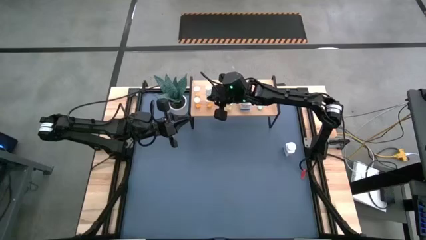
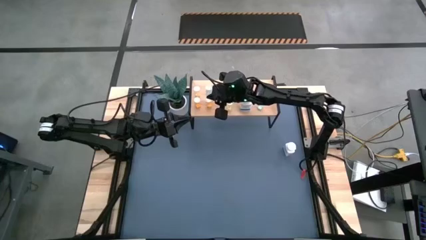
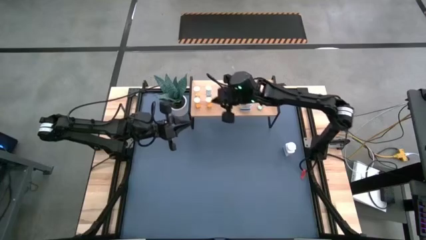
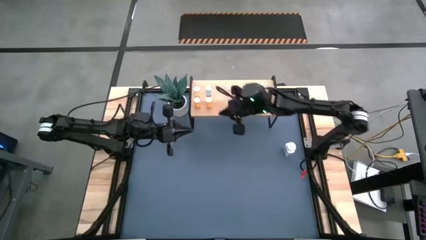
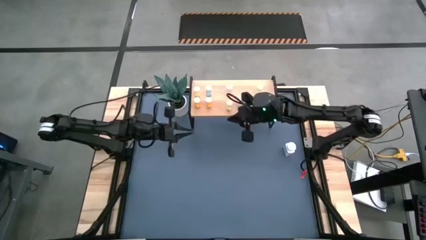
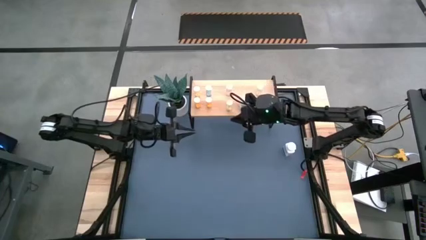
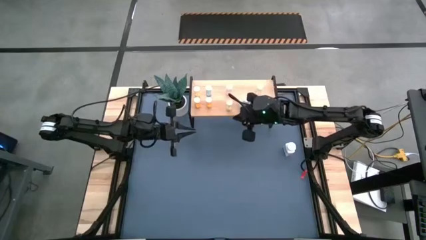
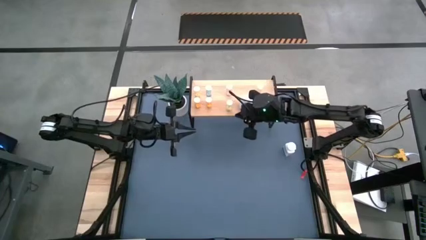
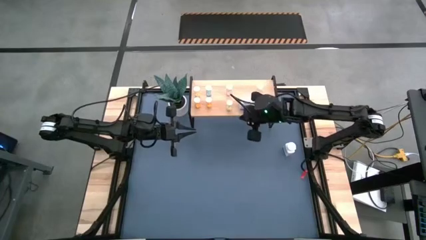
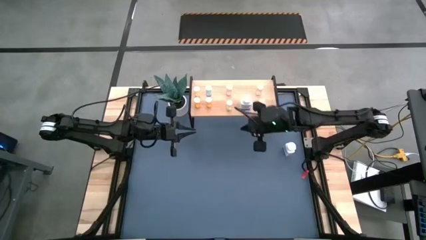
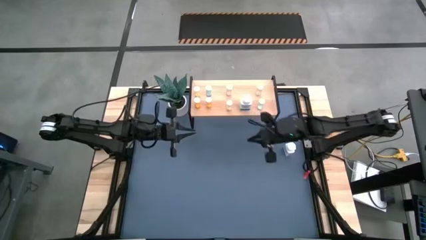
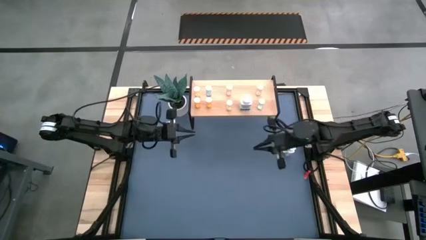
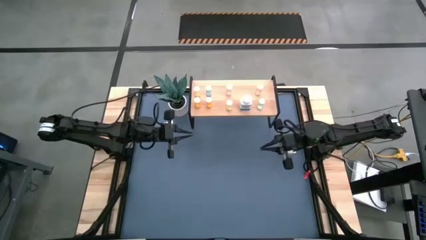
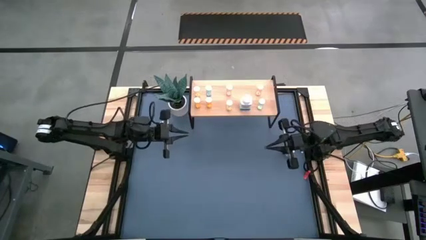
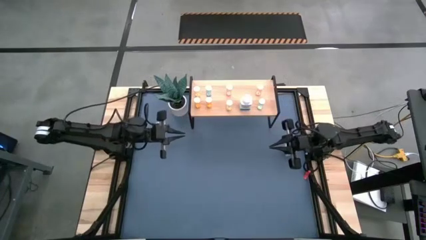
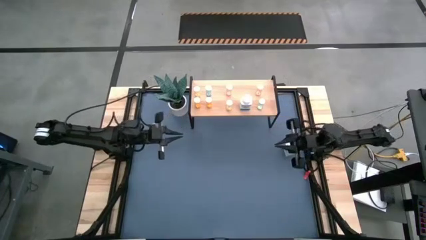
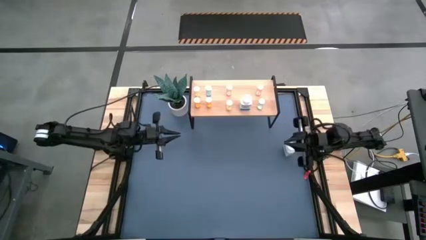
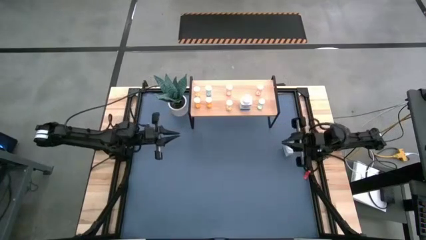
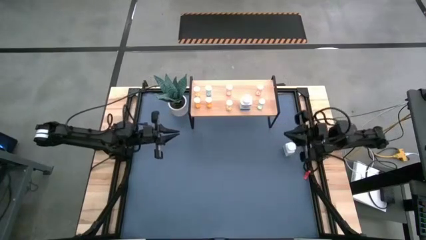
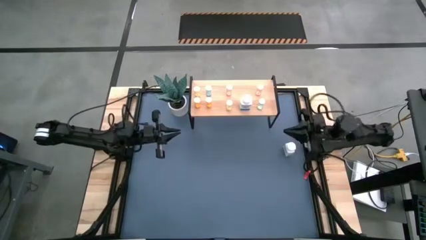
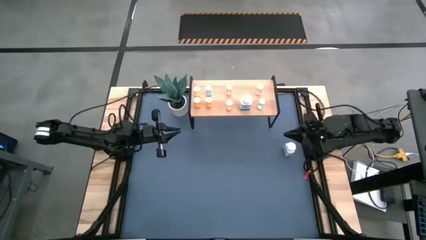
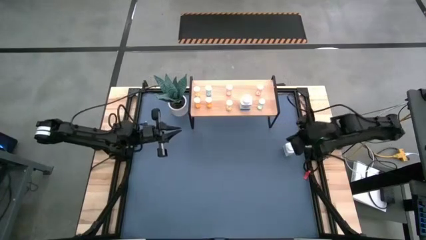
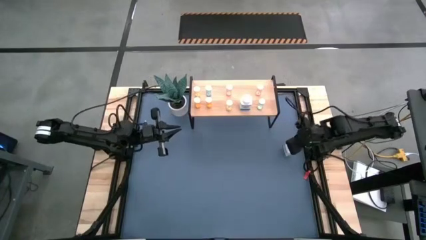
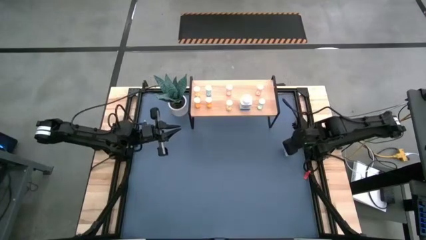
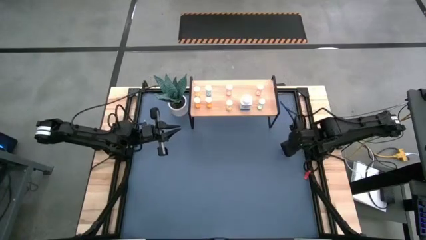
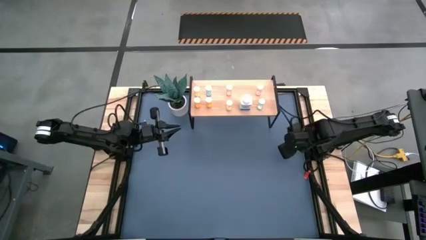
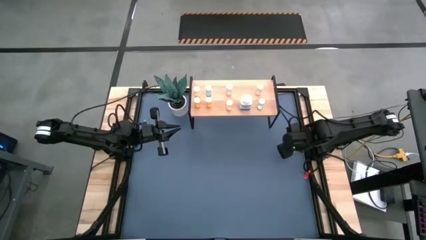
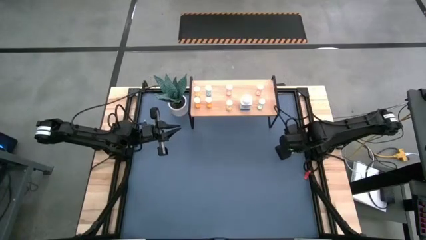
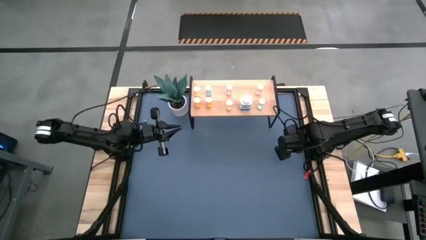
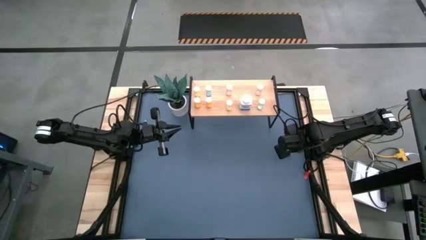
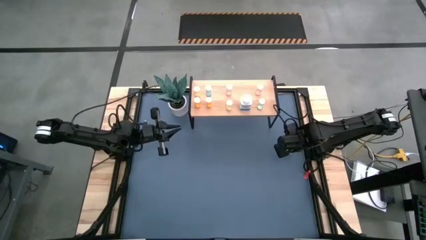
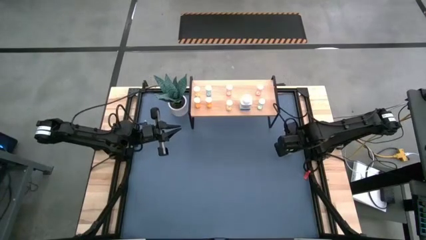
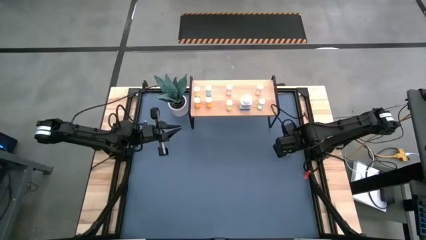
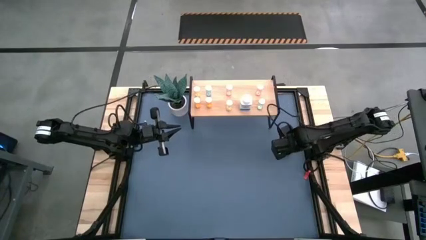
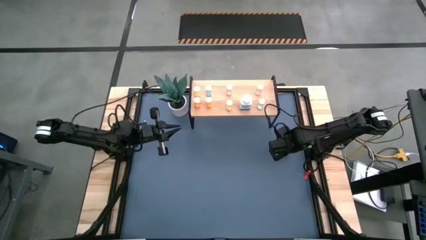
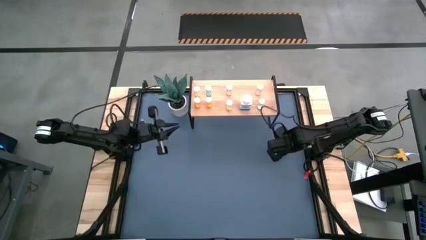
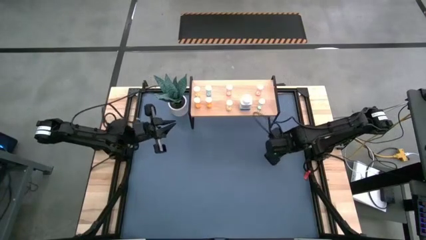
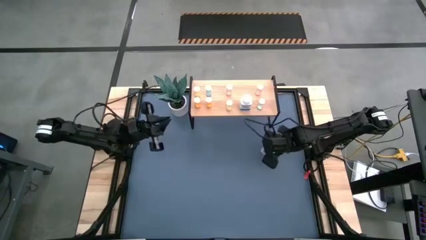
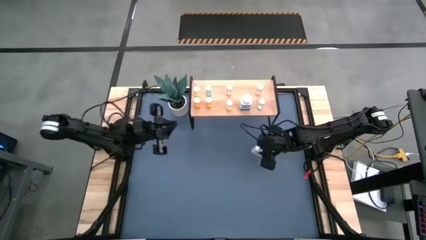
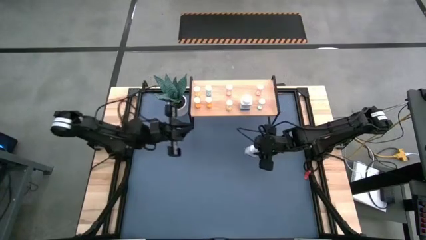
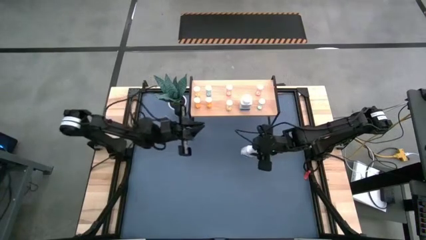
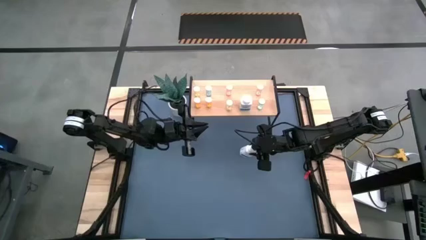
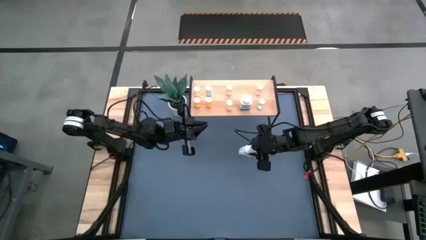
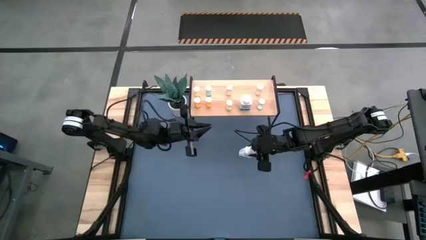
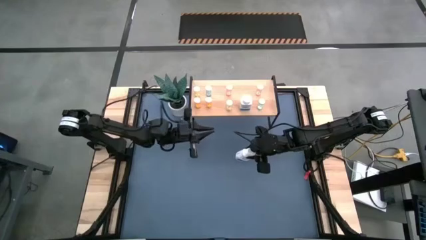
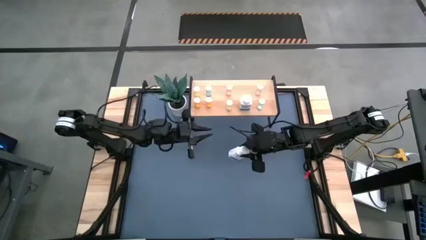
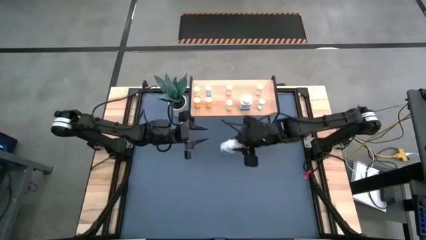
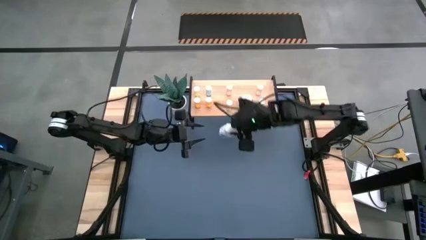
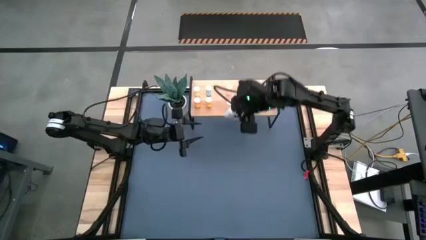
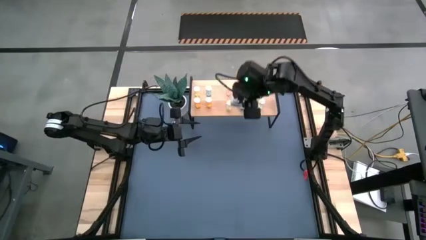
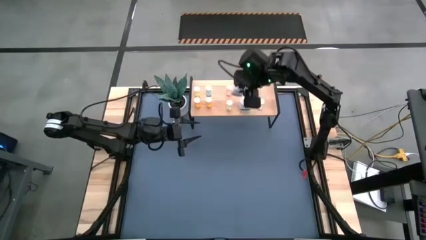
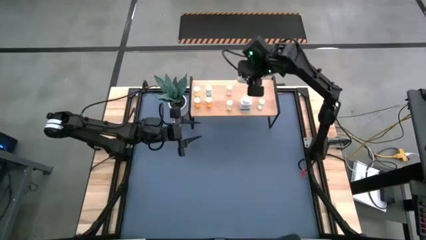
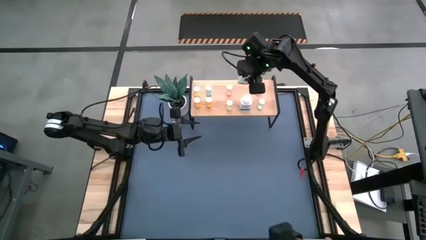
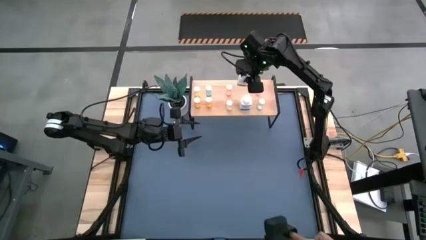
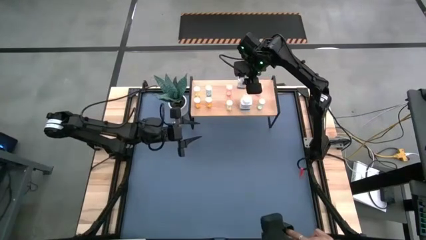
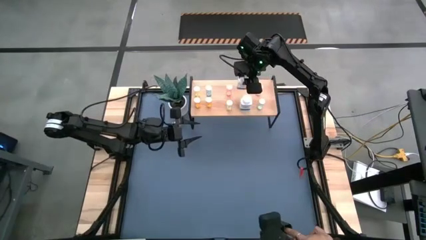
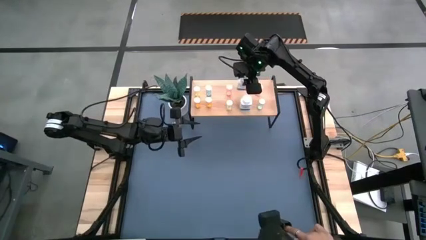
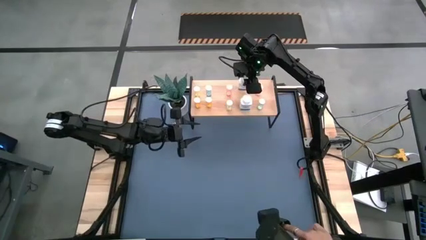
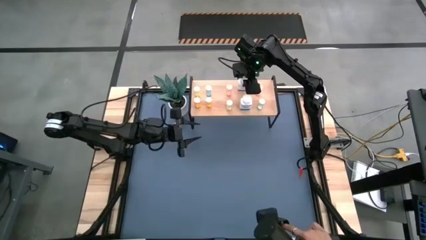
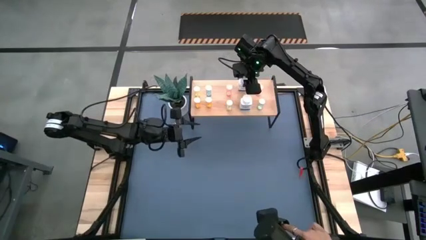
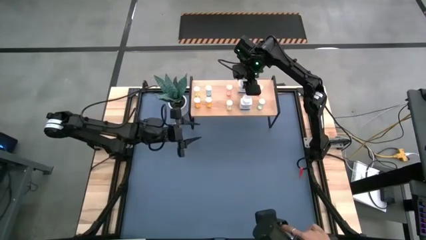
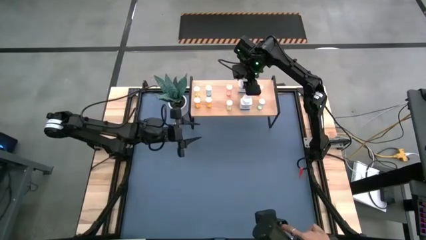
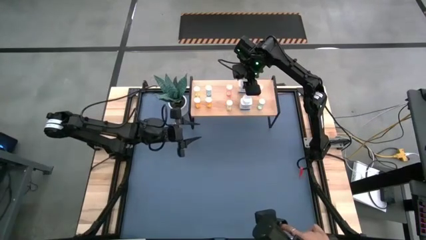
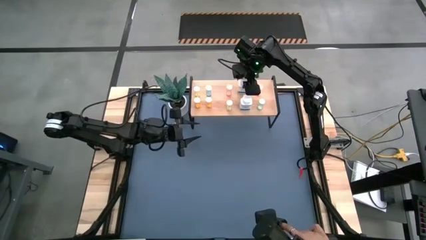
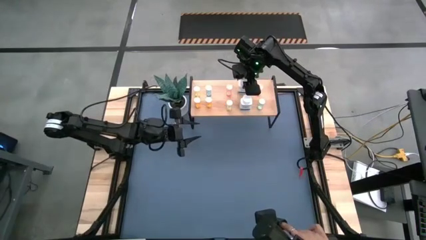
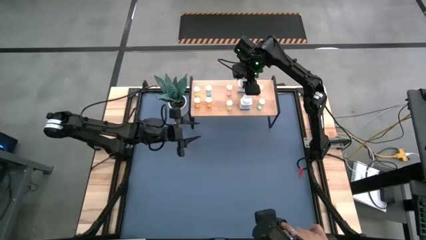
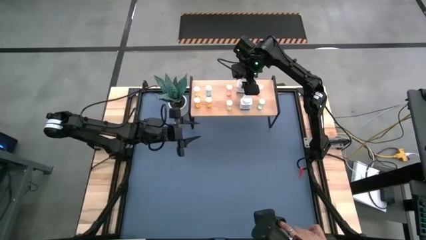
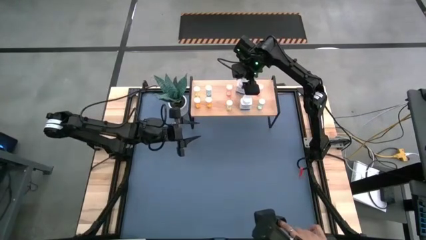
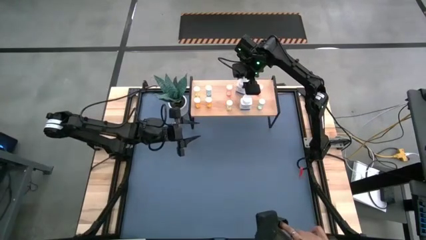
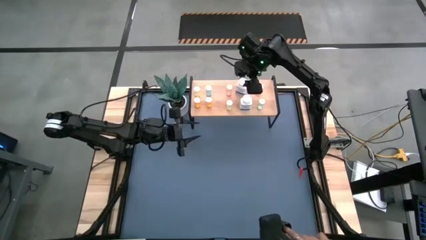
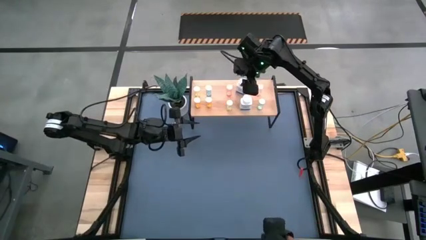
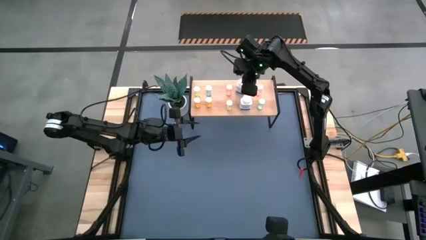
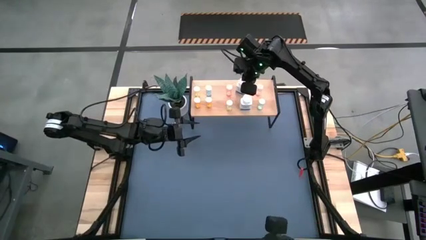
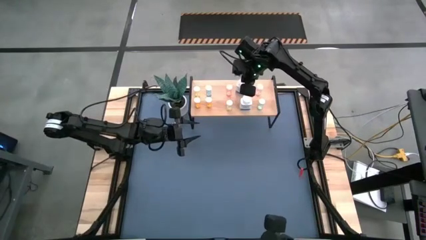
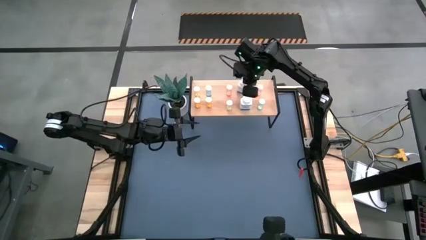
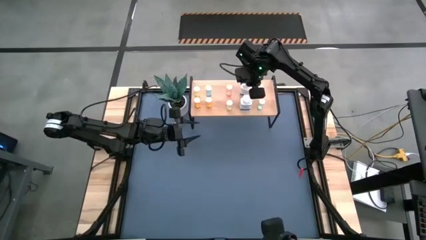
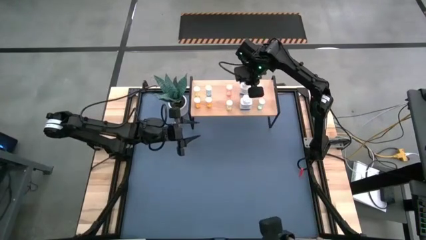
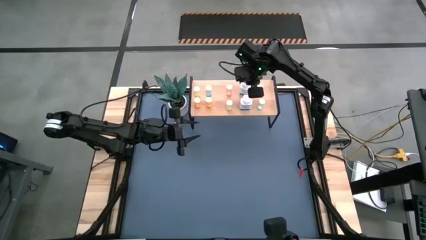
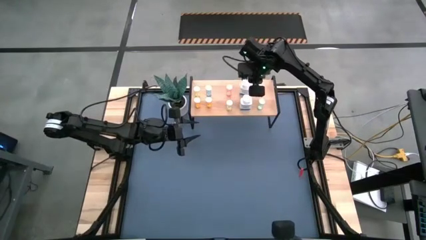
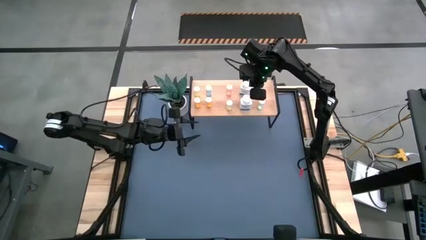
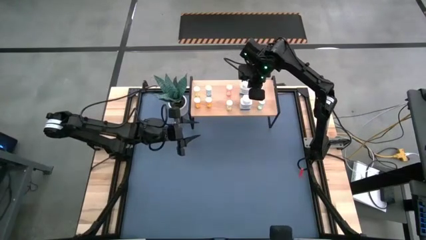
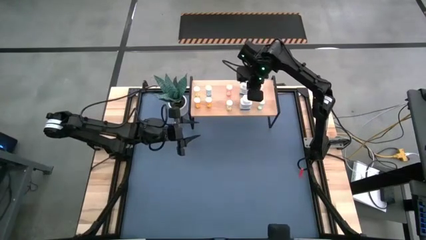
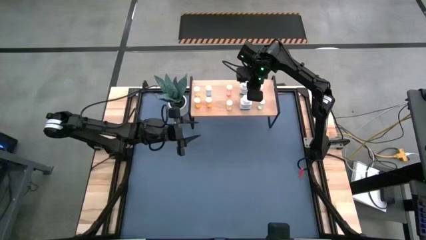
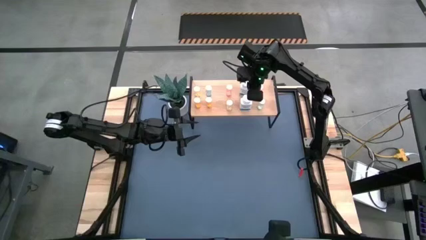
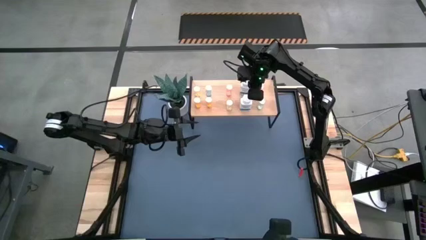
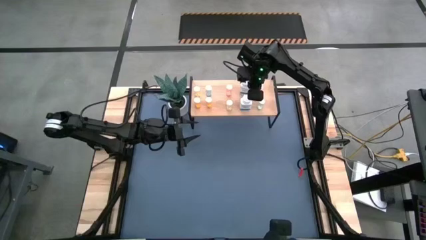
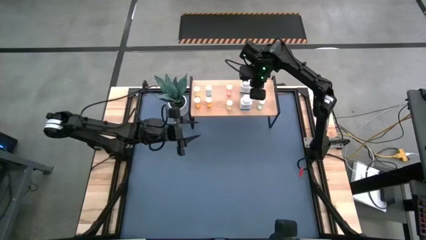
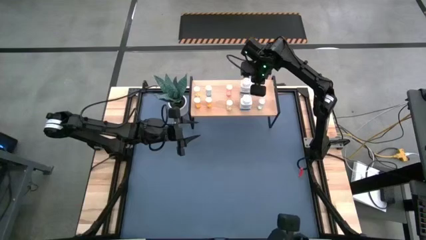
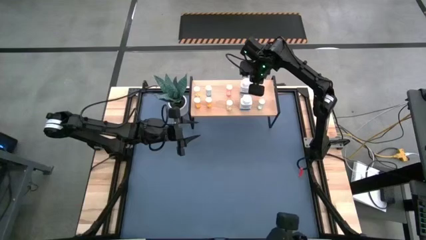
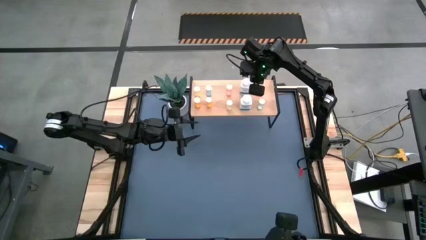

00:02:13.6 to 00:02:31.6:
Task: Pick and place medicine bottles onto shelf by color
Put the white medicine bottle on the shelf
